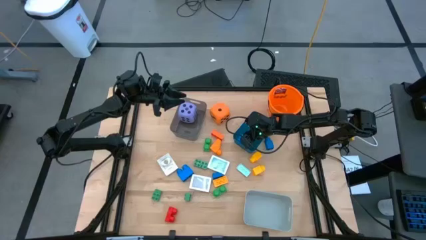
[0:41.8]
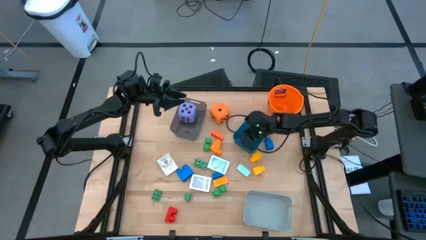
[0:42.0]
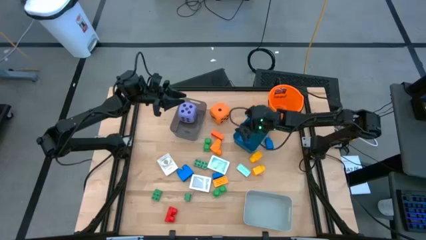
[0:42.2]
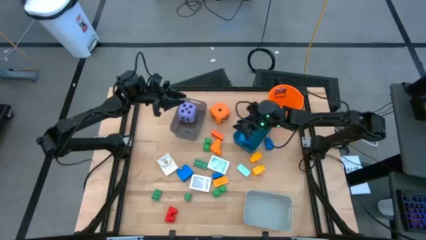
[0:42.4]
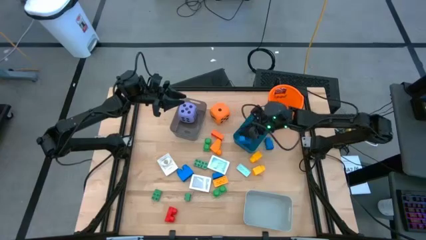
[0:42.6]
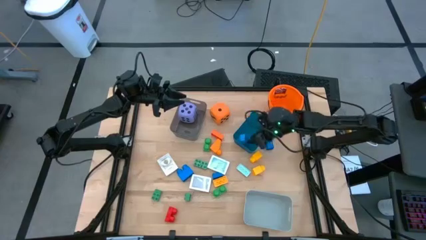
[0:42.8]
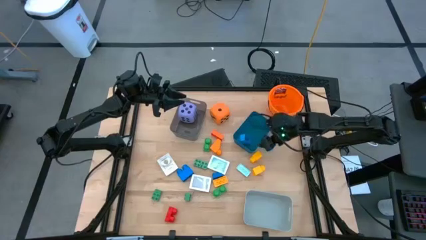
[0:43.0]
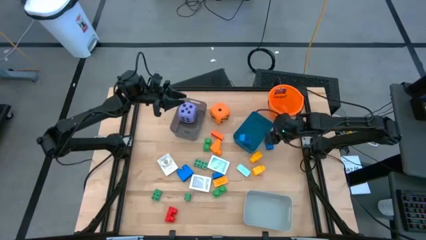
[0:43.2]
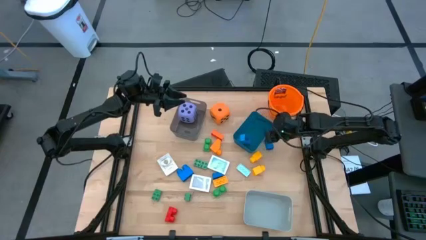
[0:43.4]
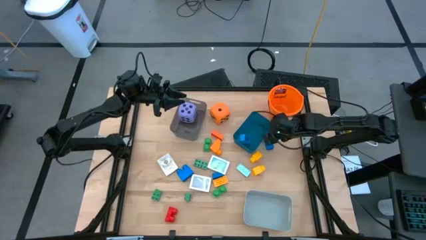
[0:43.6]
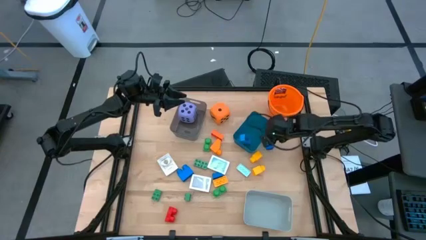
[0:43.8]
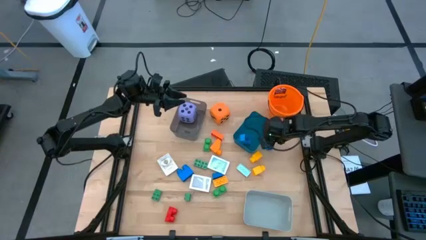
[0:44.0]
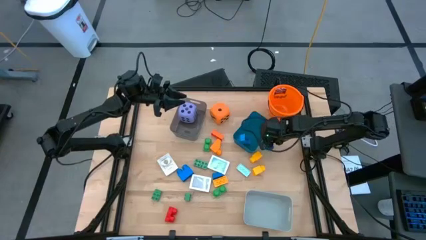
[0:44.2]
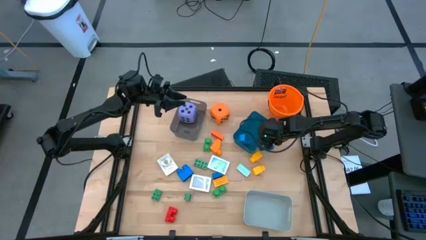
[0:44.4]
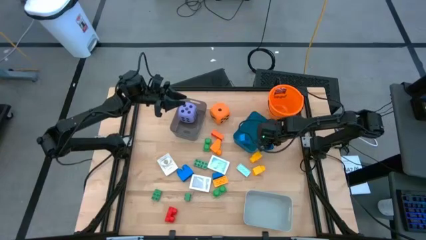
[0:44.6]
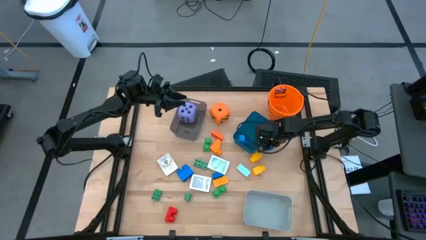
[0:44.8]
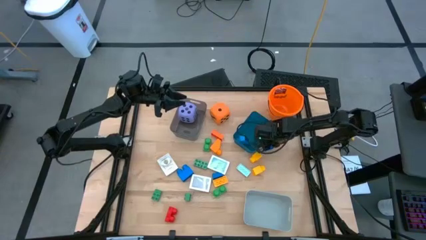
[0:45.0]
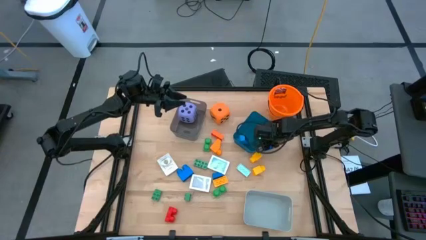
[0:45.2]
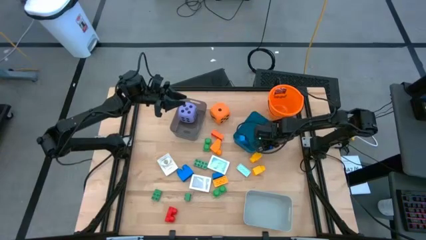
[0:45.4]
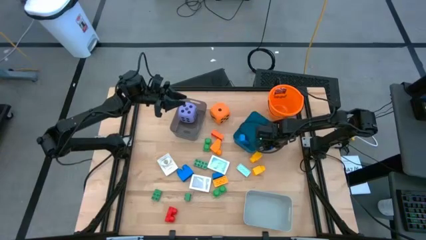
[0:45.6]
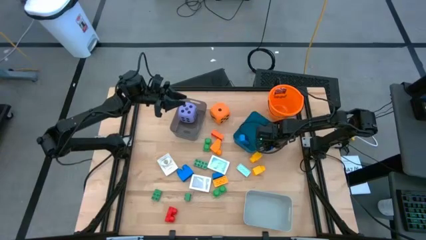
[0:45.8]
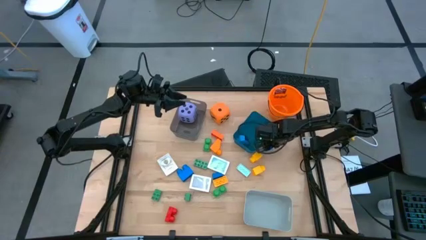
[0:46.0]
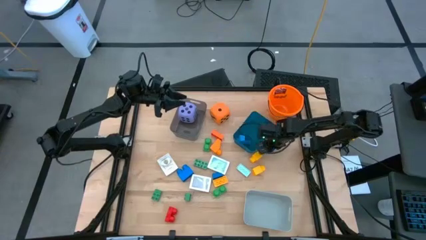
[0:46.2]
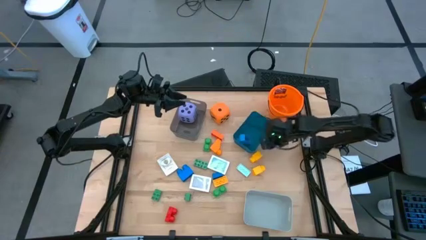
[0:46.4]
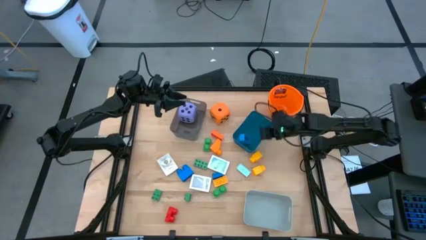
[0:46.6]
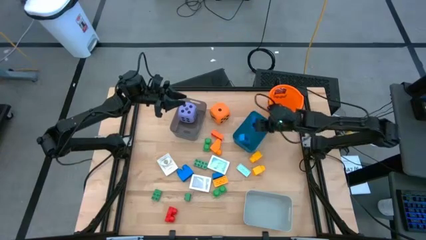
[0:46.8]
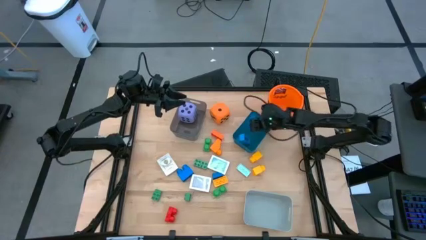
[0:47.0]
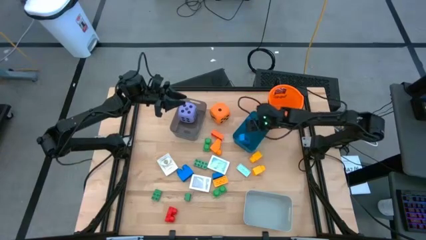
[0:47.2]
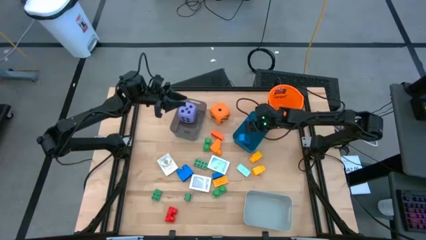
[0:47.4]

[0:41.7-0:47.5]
Task: Pick & Place Toys
Put the right blue game piece into the blue bin

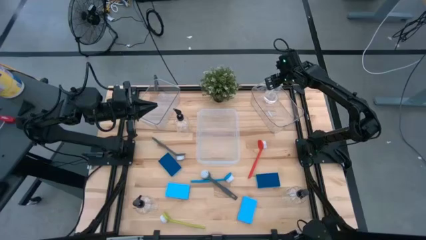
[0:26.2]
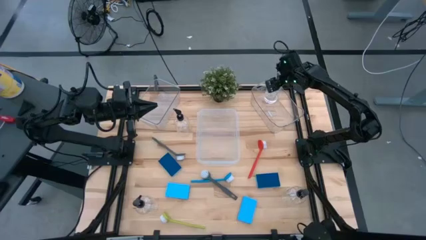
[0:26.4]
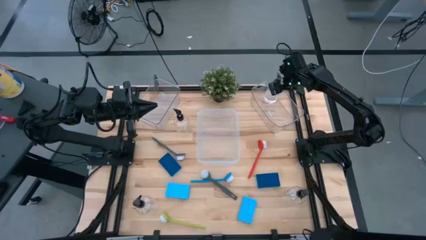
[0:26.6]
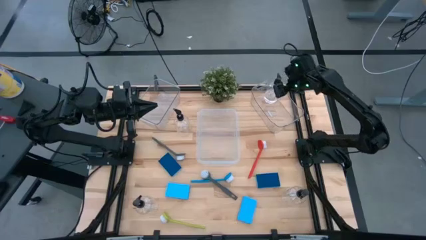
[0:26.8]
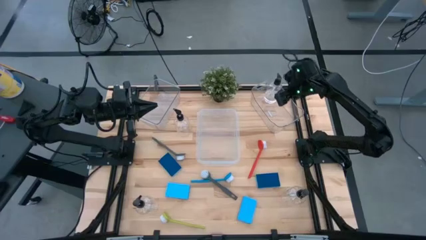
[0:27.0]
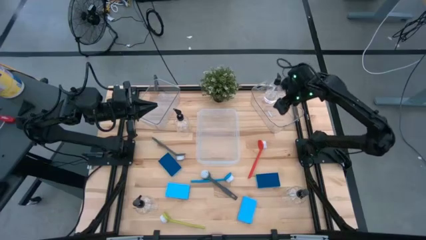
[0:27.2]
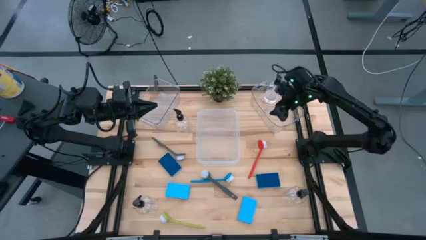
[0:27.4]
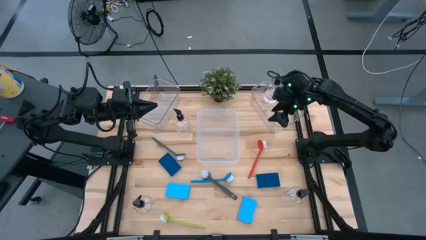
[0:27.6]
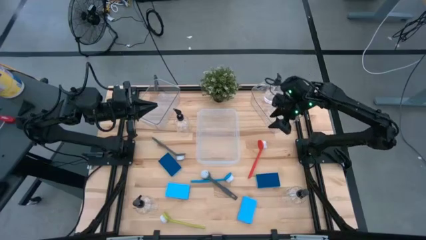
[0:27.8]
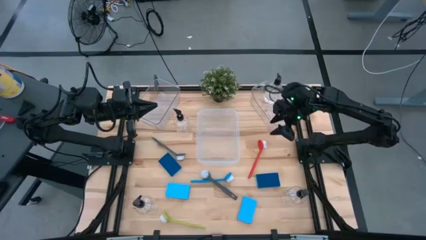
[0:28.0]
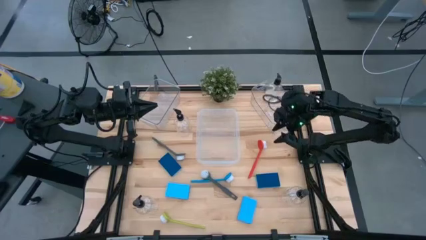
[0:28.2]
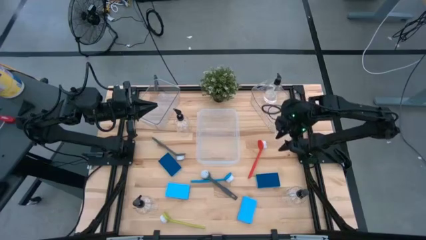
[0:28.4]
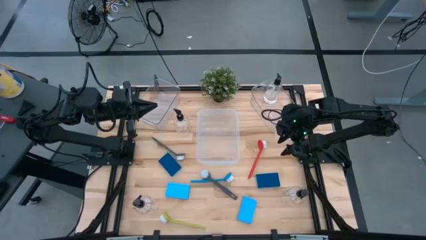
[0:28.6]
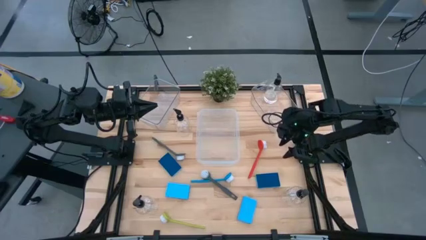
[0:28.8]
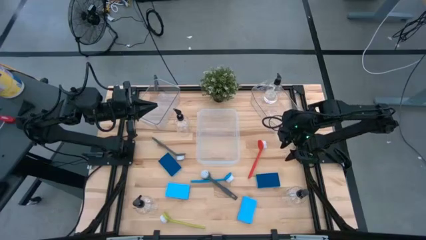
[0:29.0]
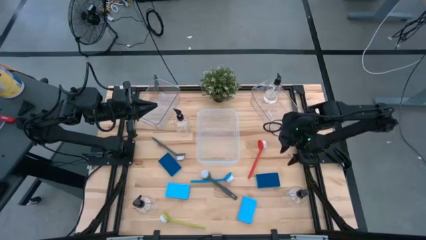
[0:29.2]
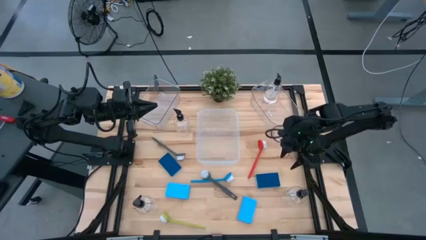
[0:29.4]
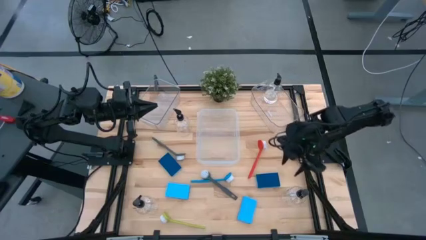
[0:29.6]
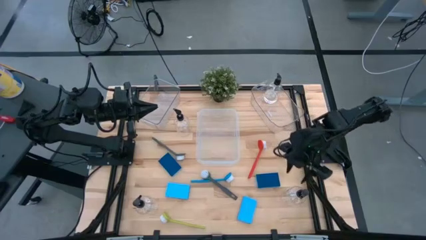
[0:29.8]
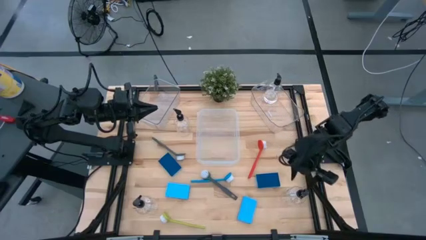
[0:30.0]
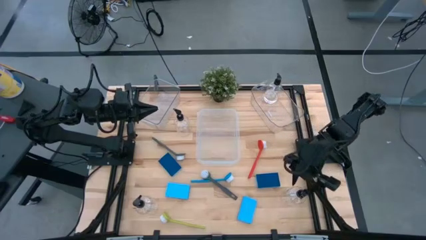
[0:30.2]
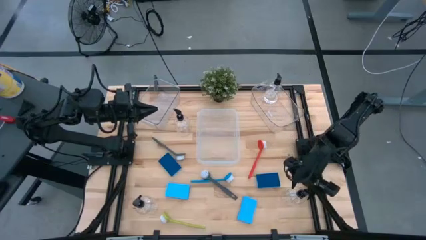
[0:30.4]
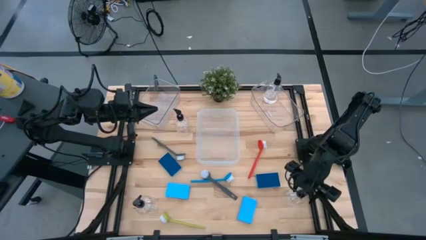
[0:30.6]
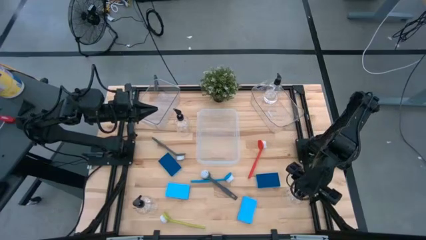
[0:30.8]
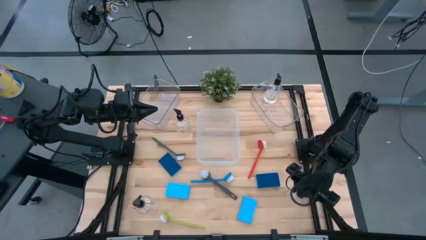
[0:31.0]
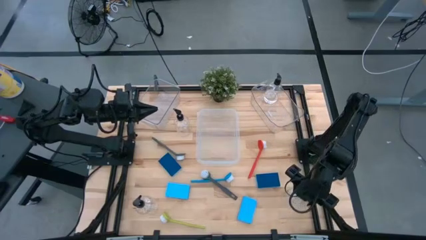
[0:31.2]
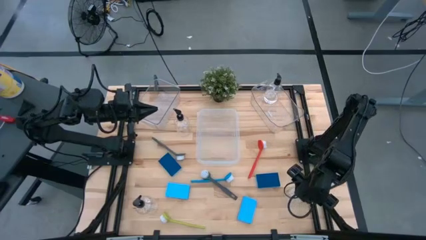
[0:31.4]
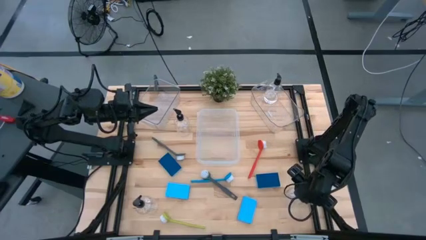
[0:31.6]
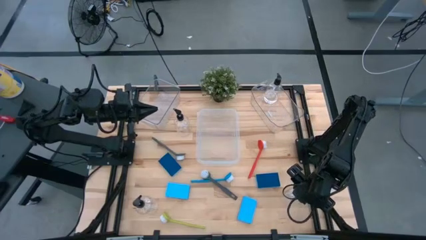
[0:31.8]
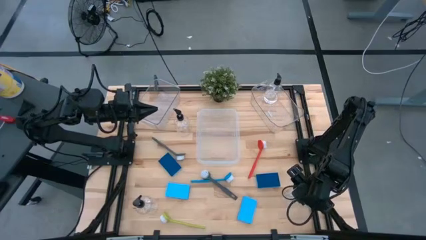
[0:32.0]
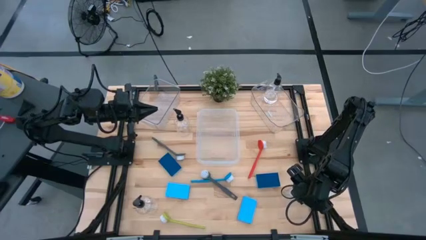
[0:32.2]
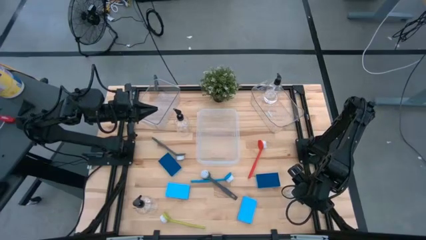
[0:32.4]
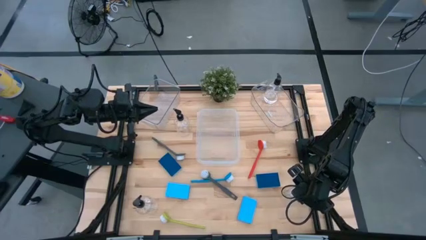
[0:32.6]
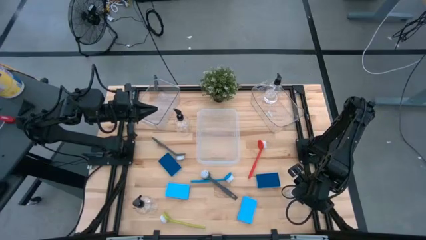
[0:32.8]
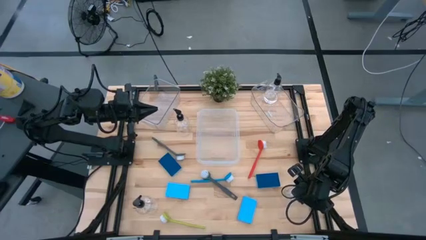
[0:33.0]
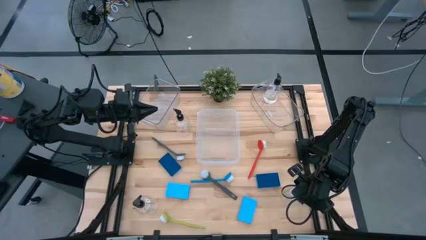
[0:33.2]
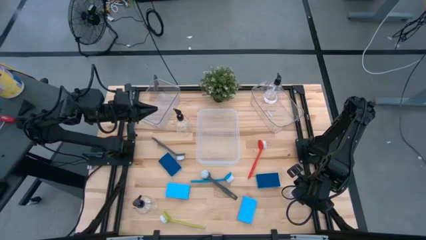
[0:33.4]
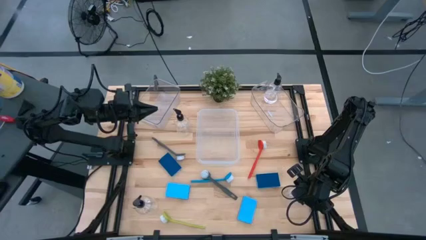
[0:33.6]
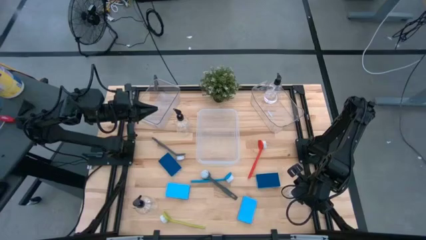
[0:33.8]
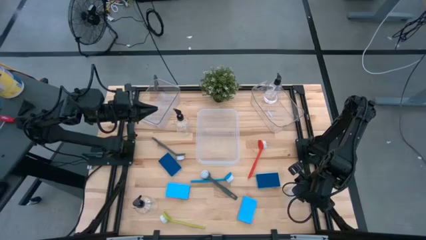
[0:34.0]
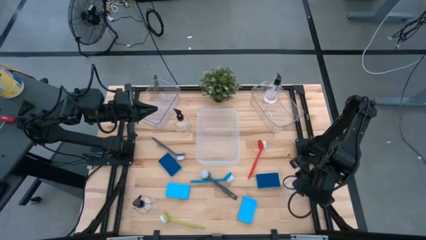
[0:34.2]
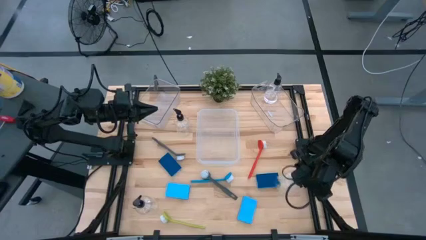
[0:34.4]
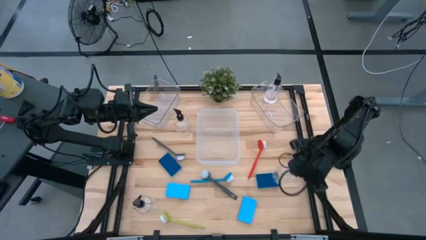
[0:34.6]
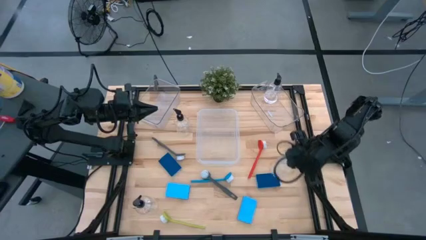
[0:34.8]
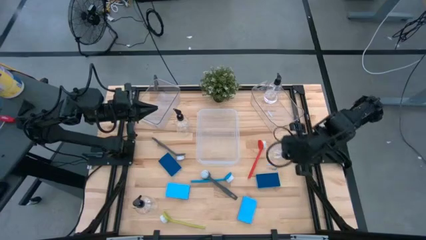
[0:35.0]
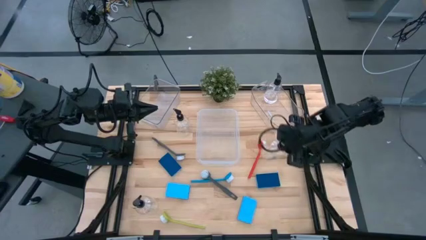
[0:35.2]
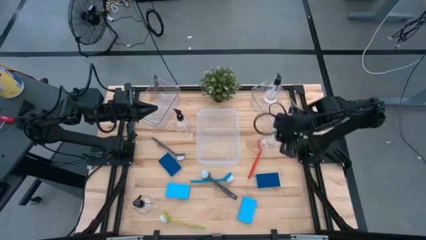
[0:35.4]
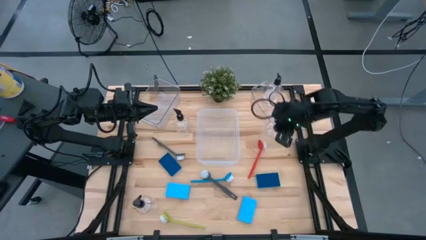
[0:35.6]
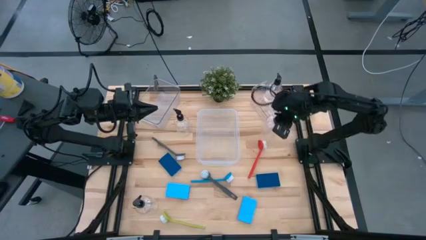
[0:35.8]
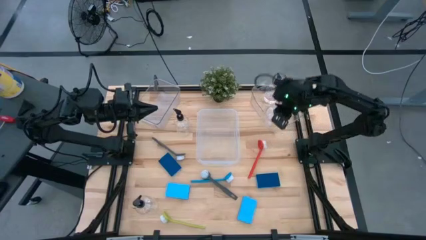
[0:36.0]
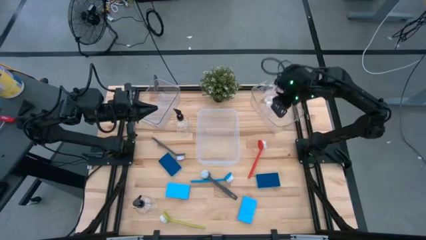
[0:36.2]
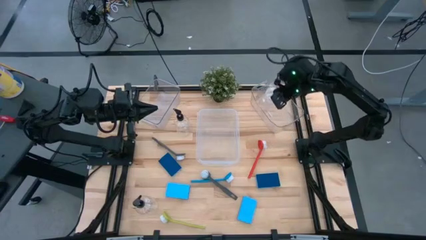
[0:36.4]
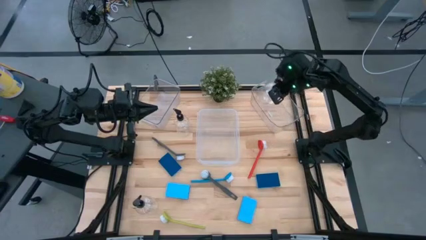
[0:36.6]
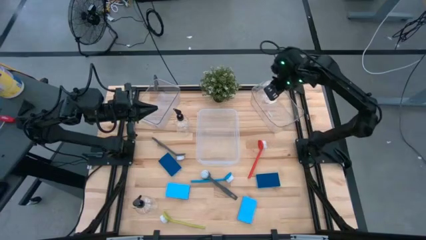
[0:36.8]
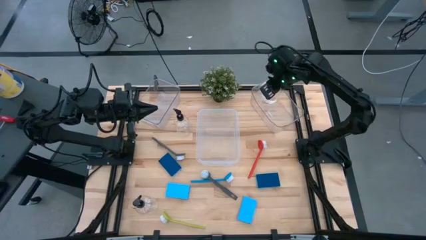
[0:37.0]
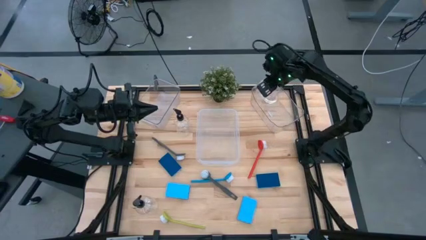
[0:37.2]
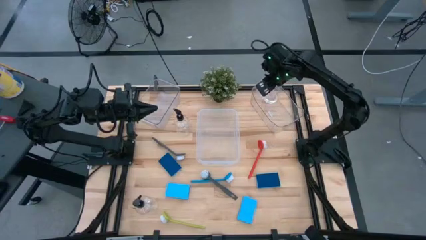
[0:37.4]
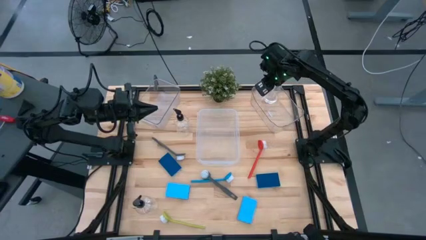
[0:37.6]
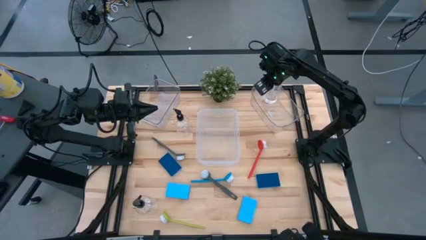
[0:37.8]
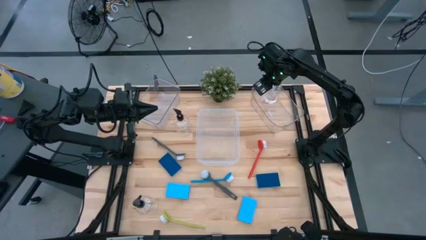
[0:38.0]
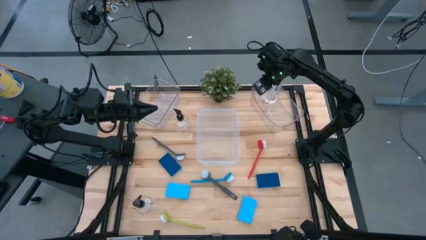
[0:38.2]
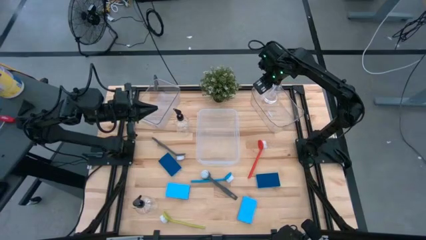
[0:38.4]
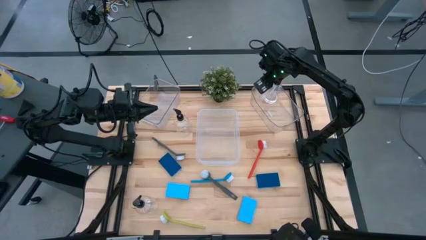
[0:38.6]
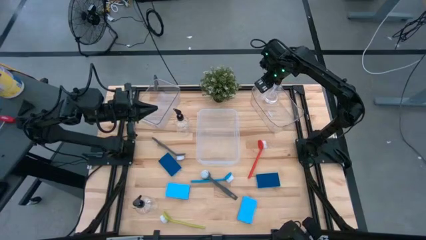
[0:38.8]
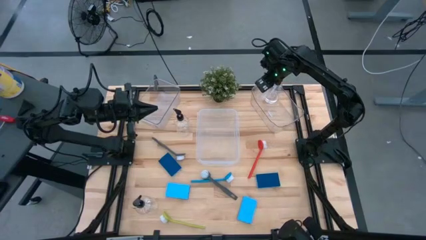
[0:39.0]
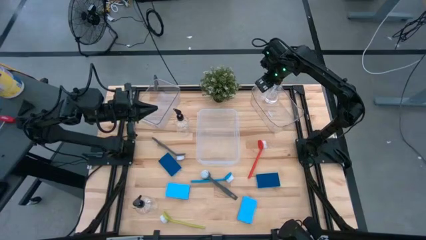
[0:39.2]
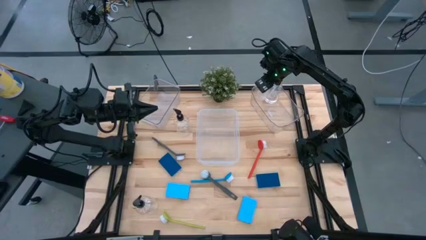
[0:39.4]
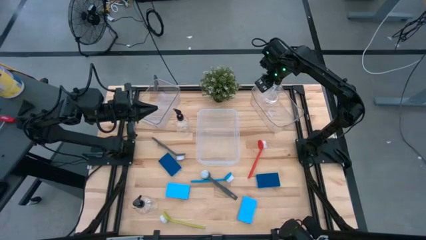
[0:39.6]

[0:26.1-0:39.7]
Task: Pick & Place Kitchen Sink Supplies
Put the black soap dispenser into the right transparent bin
